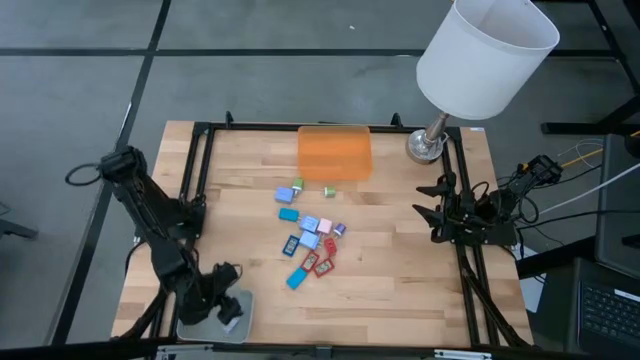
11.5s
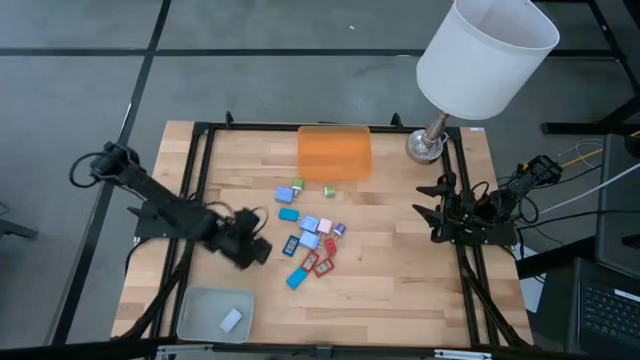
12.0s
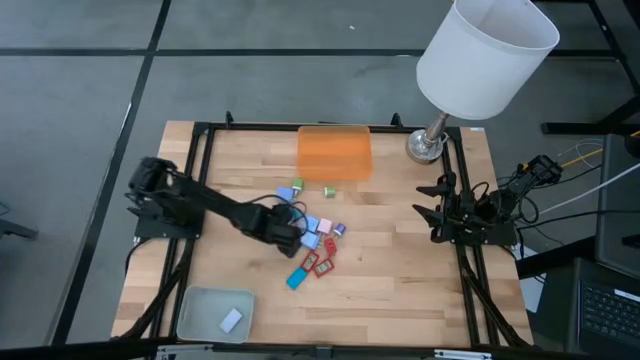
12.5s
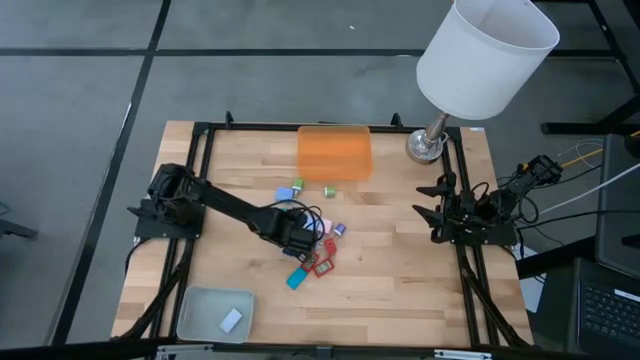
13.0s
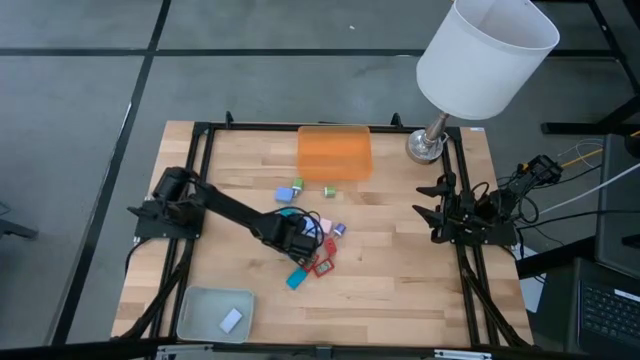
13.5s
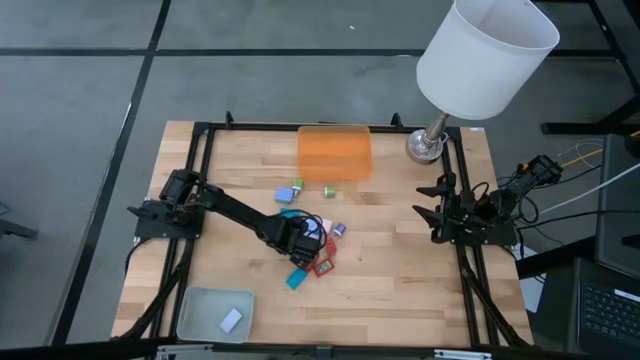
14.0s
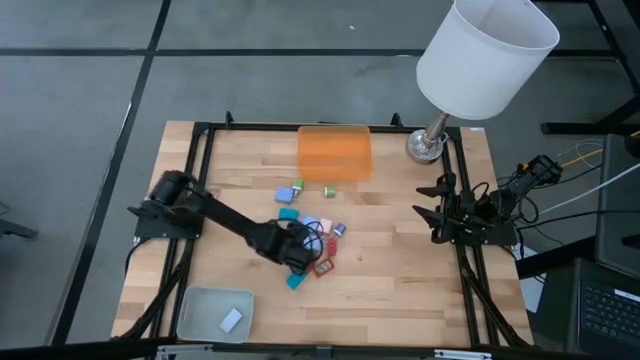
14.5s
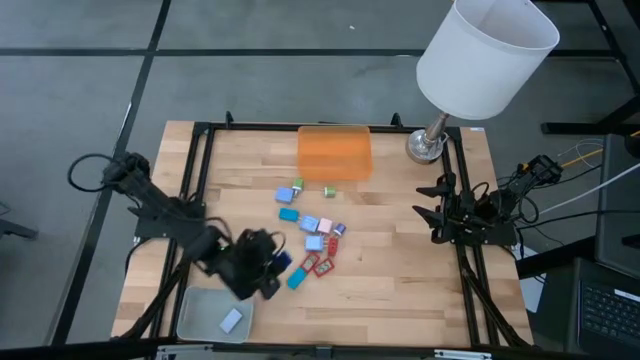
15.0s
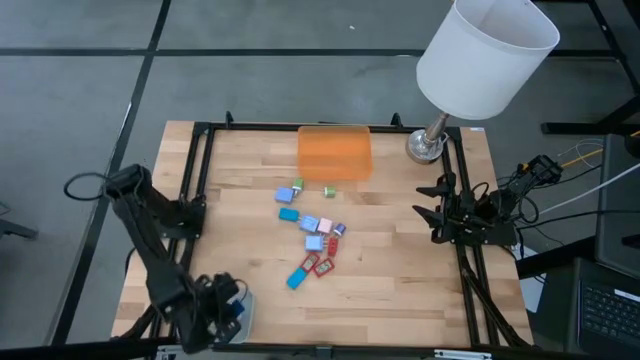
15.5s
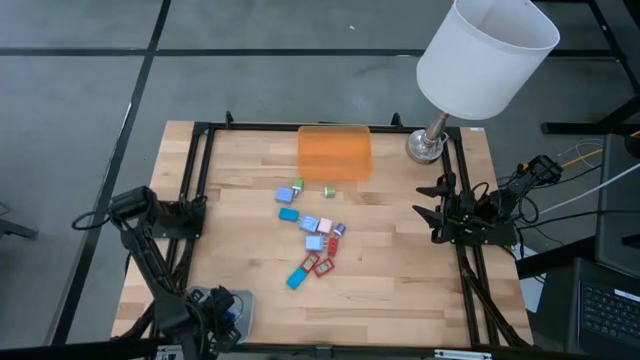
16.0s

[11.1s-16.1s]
Task: Pick & Place Office items
Put the dark blue digital timer into the gray bin

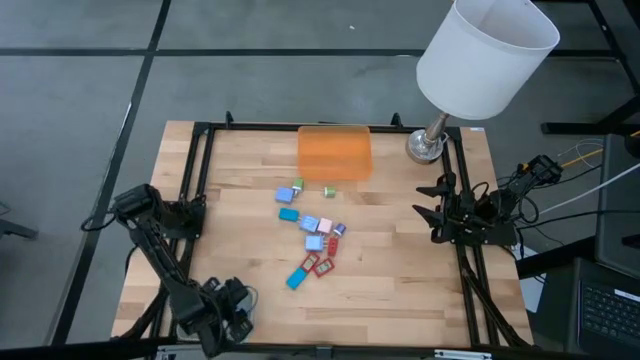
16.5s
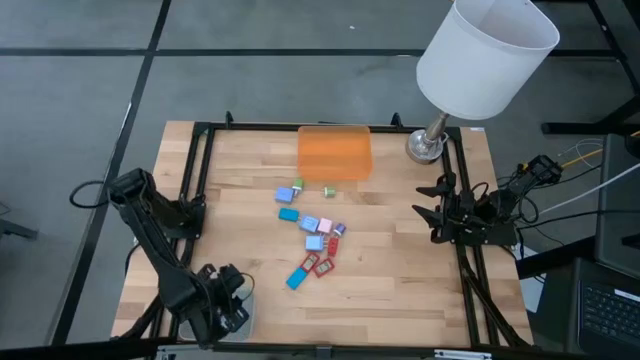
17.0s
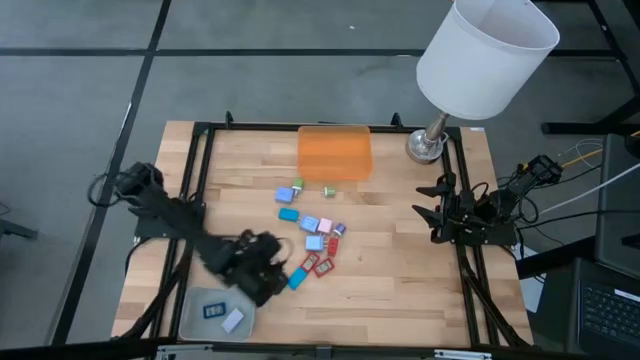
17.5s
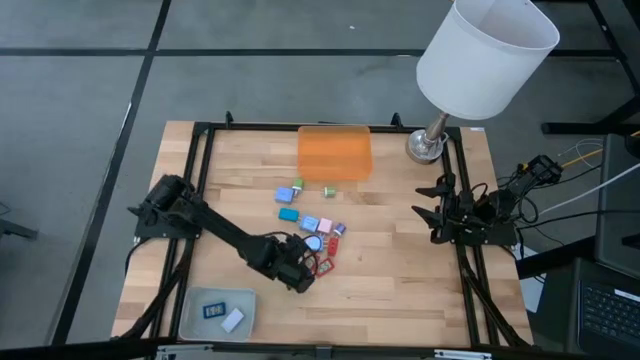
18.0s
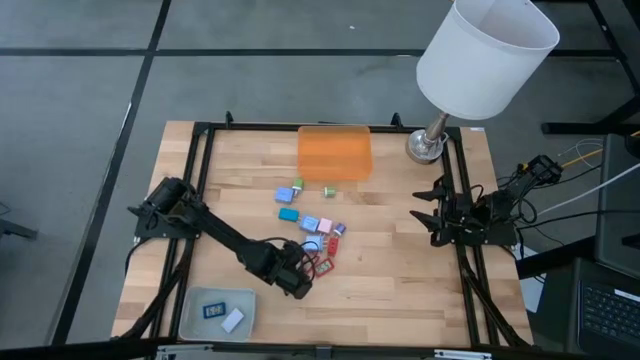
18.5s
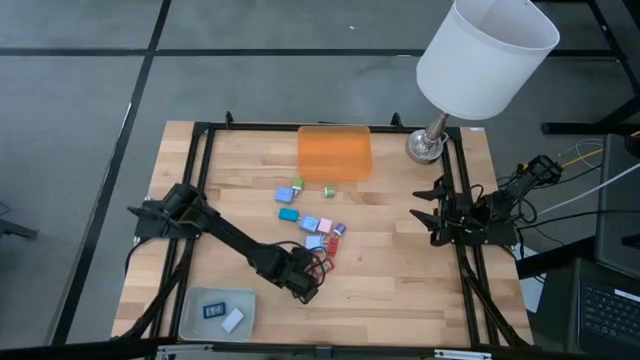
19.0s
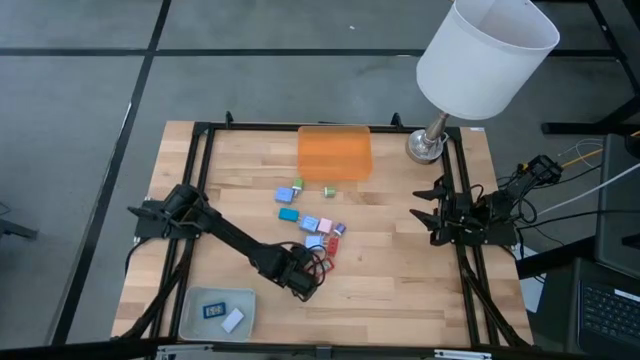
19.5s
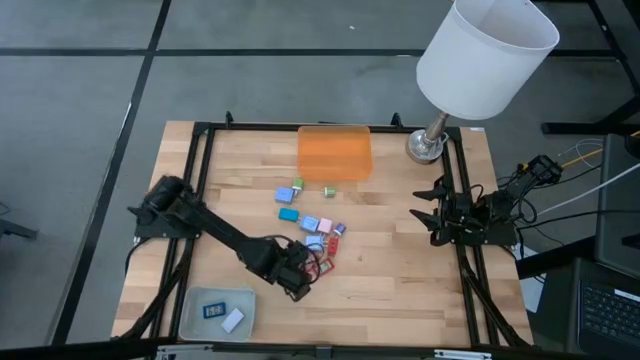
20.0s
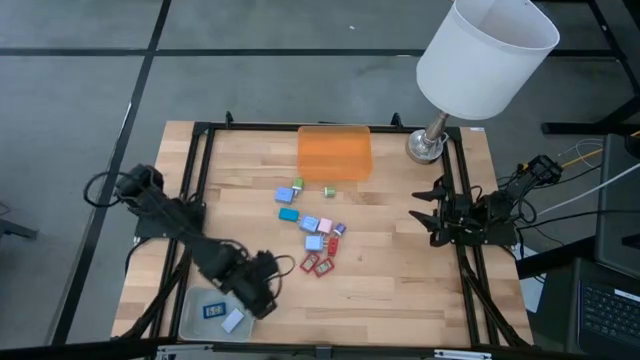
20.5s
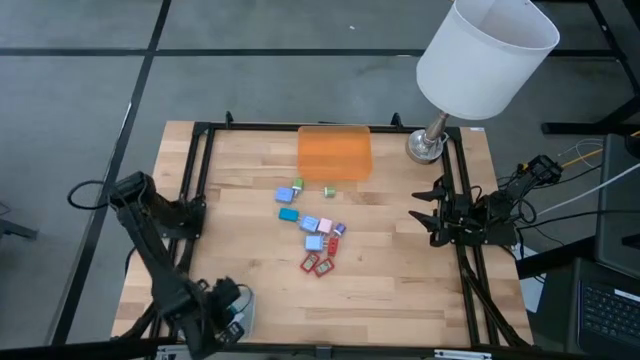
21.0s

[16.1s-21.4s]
Put the bottom blue digital timer into the gray bin

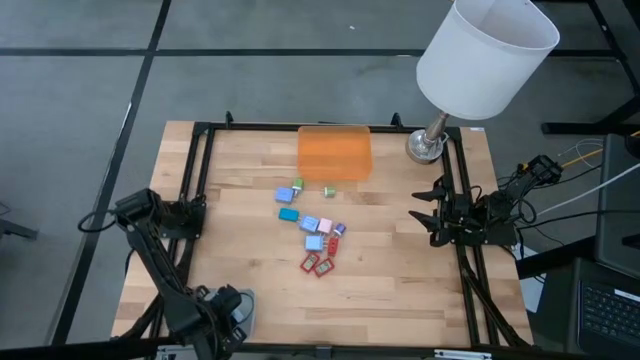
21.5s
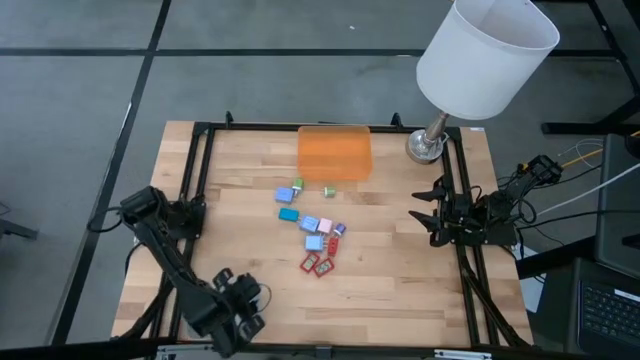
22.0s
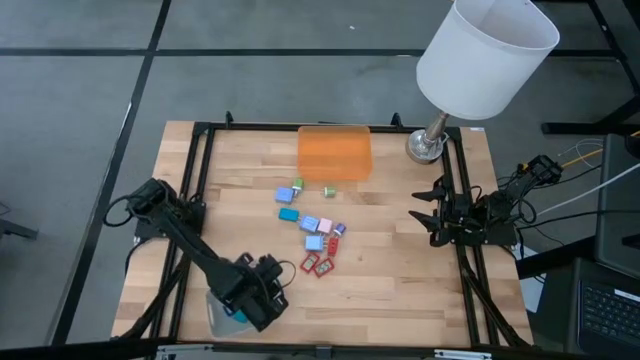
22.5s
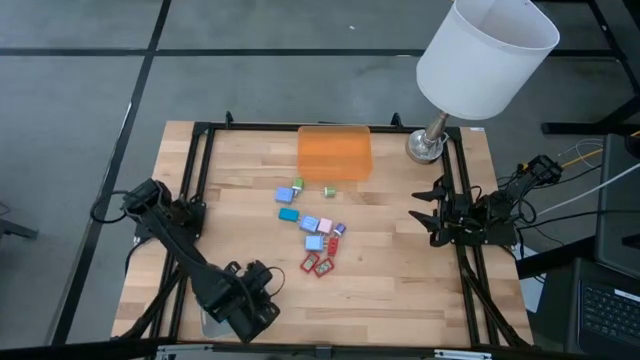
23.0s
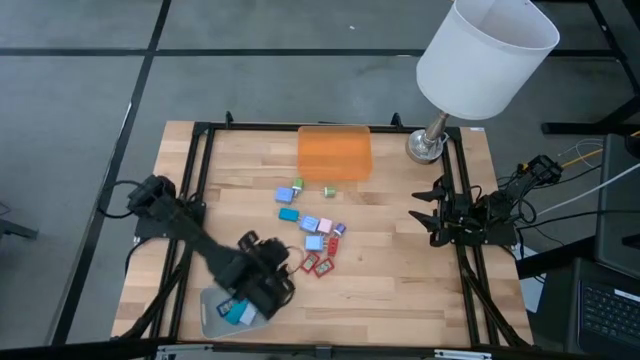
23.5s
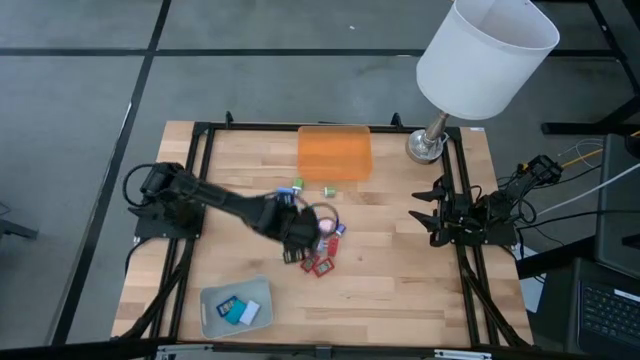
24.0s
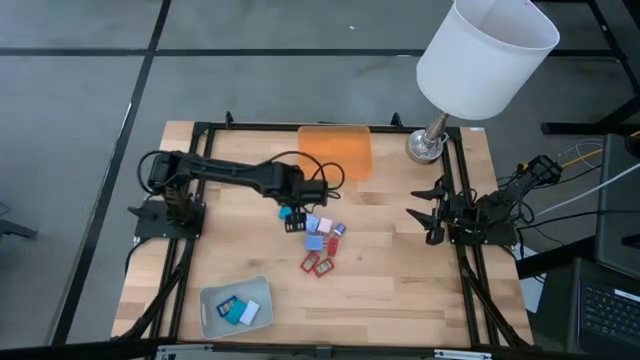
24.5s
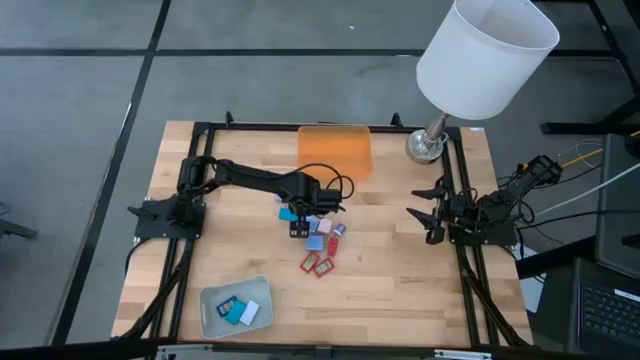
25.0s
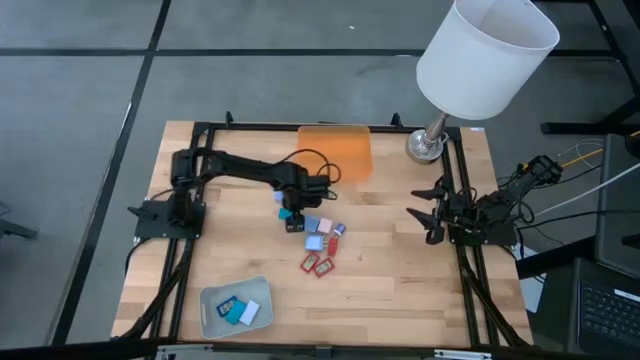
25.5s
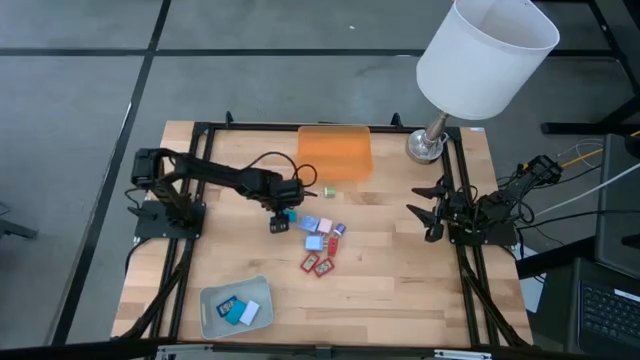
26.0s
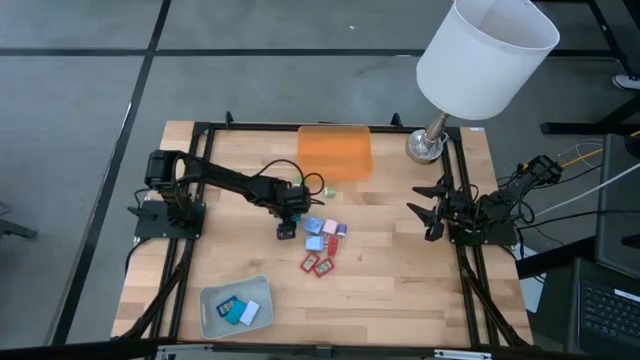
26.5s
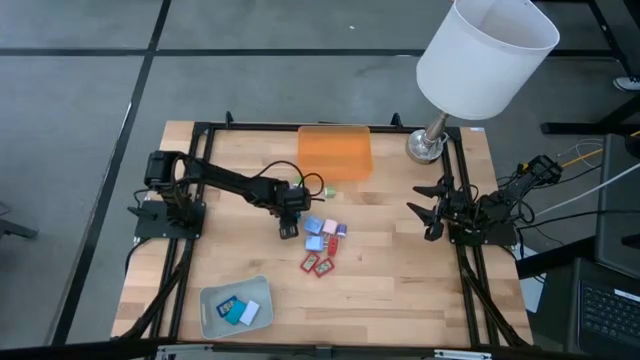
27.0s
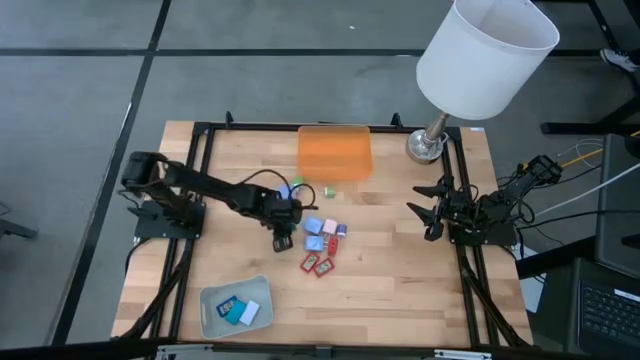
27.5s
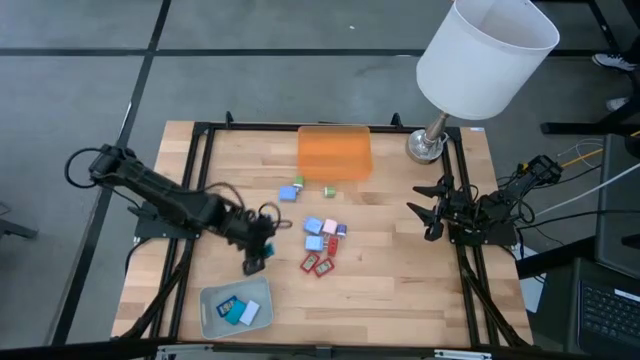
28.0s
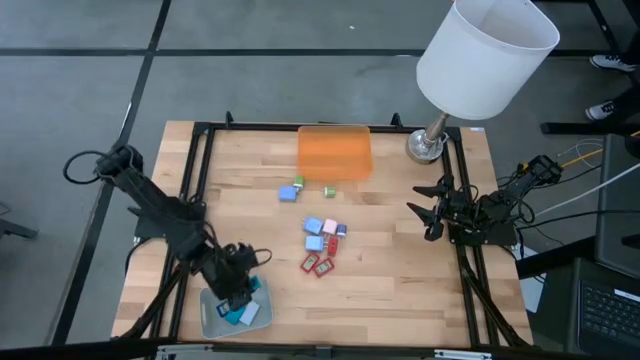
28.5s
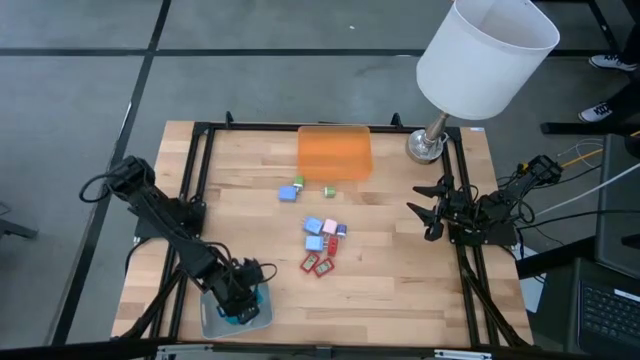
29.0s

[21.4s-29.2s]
Put the blue digital timer into the gray bin

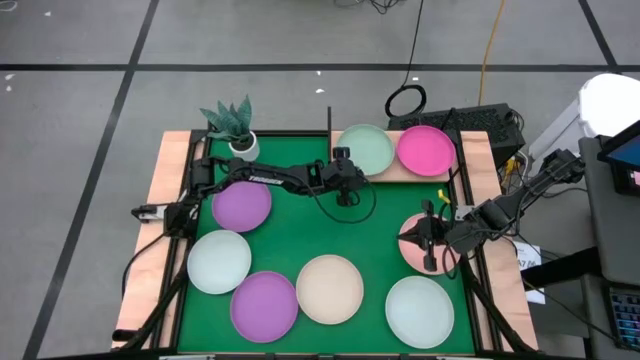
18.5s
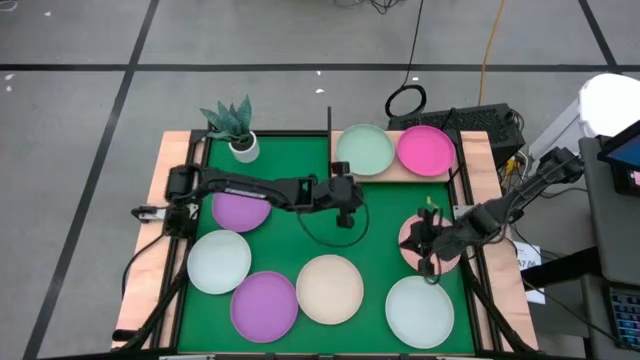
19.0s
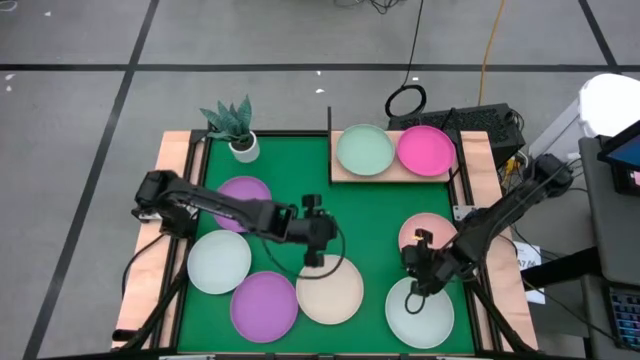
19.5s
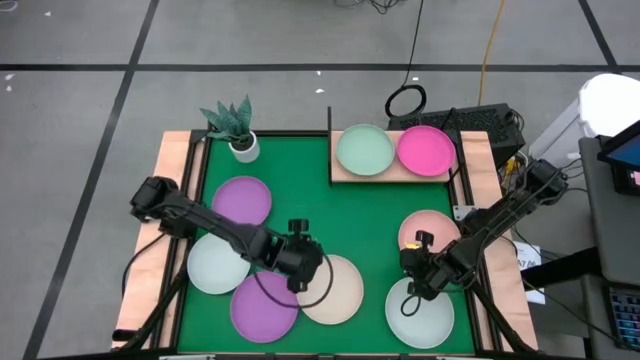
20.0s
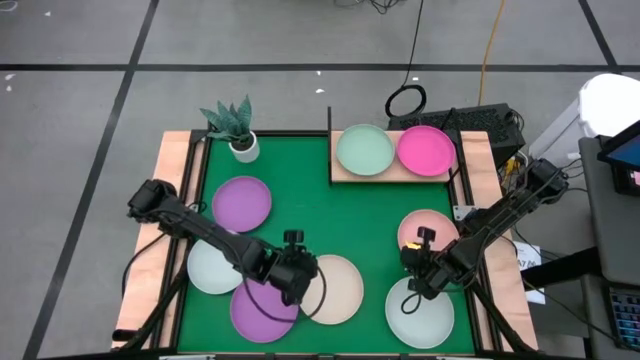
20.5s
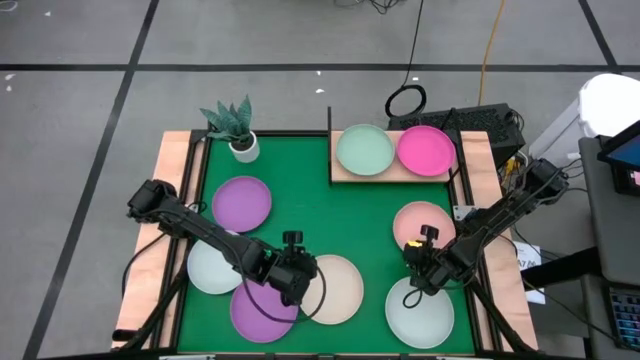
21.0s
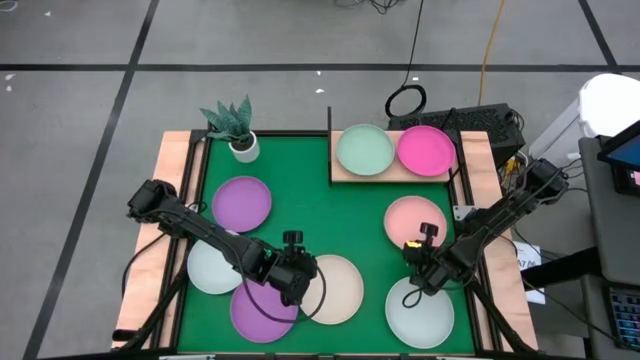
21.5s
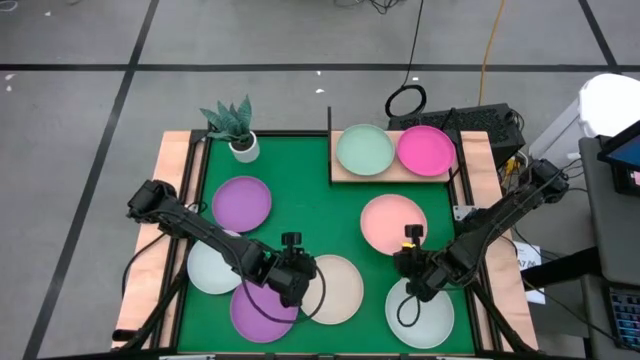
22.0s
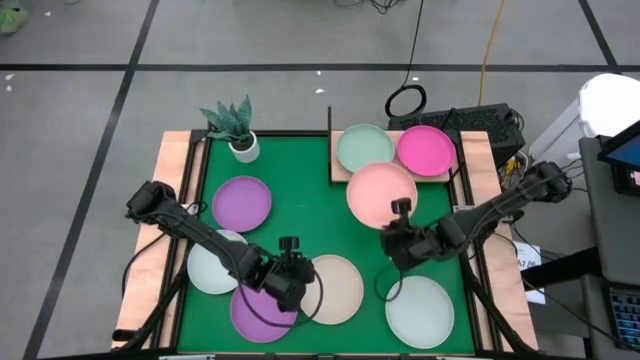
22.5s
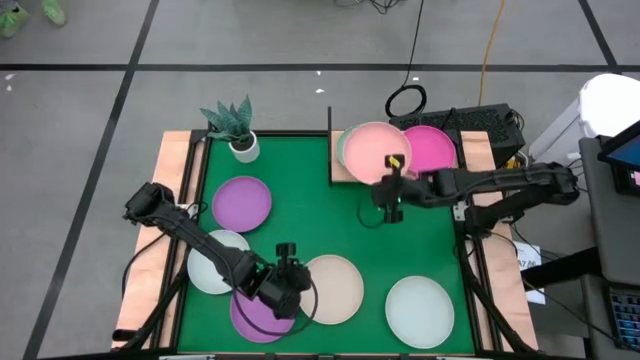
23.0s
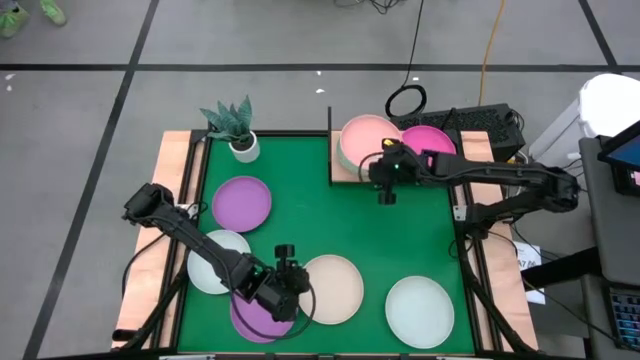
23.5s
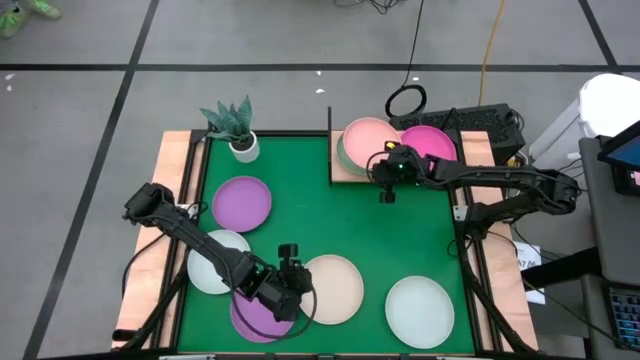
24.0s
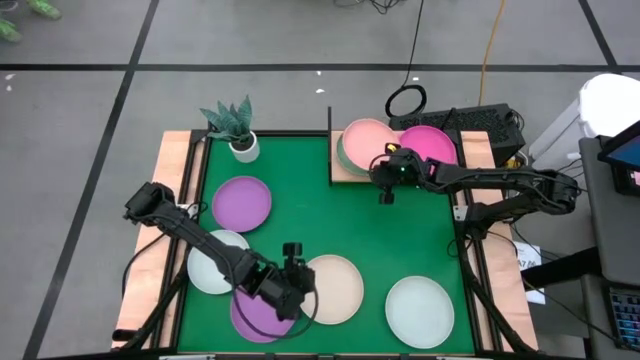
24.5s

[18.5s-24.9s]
Task: Place and stack plates onto a shelf
Stack the light orange plate on the light green plate on the shelf
